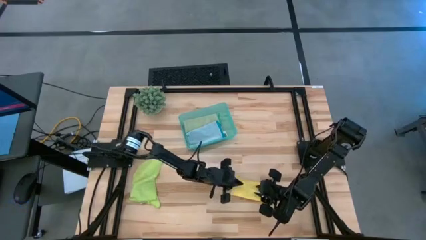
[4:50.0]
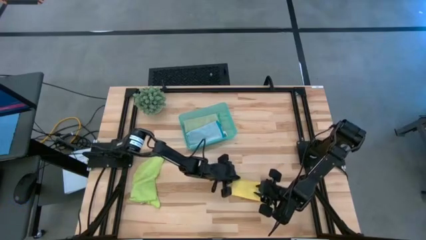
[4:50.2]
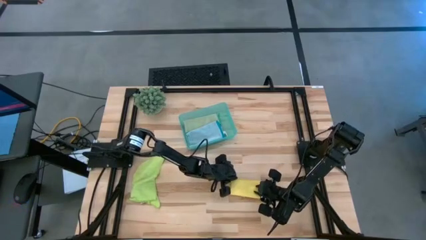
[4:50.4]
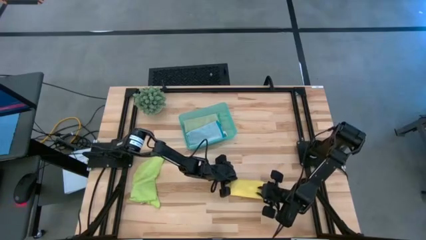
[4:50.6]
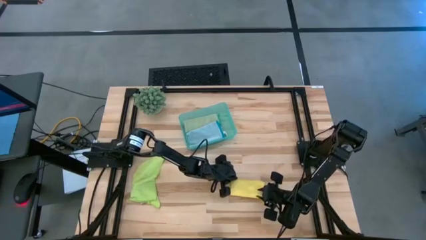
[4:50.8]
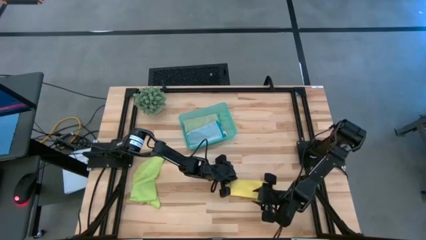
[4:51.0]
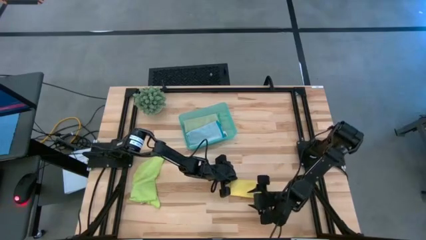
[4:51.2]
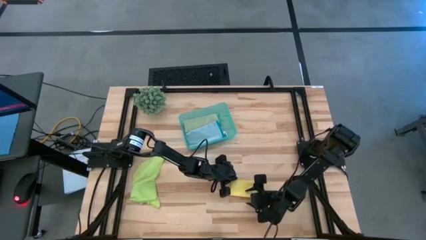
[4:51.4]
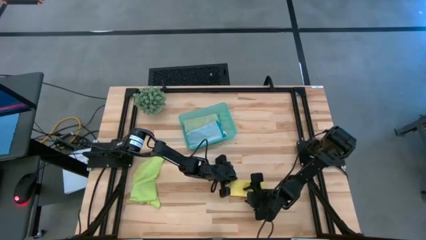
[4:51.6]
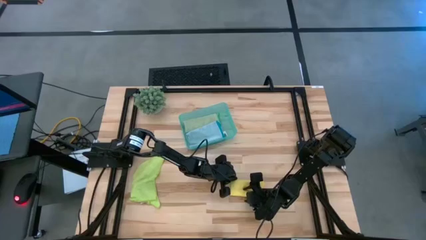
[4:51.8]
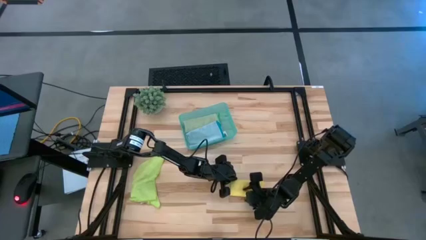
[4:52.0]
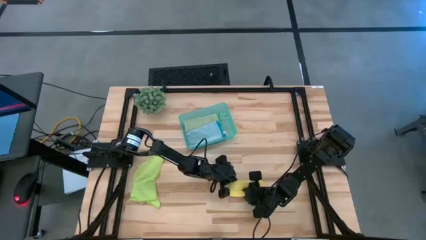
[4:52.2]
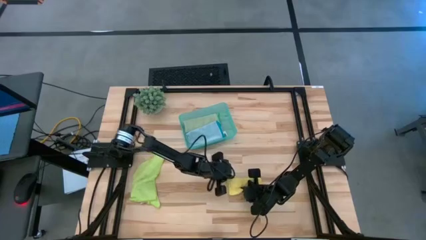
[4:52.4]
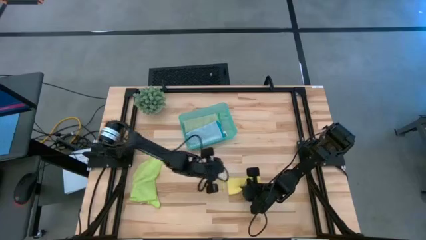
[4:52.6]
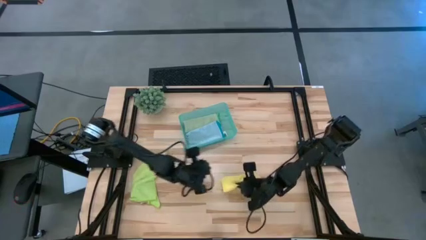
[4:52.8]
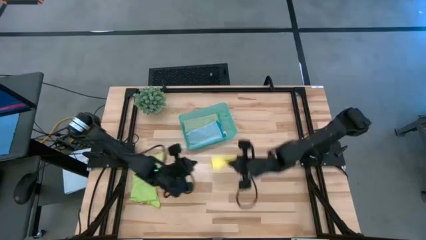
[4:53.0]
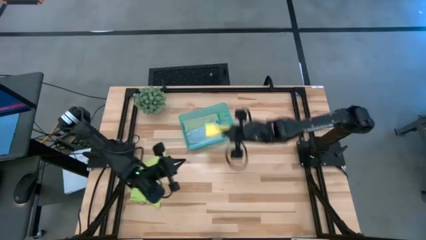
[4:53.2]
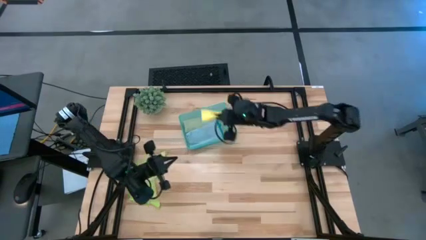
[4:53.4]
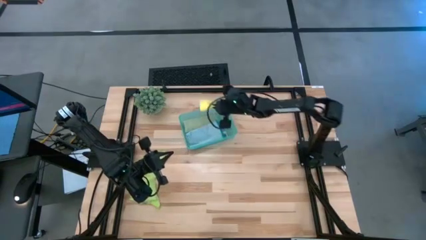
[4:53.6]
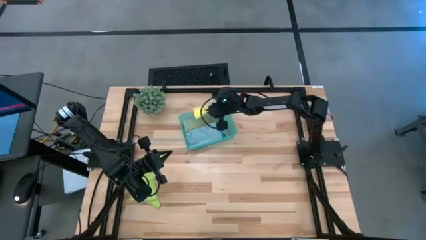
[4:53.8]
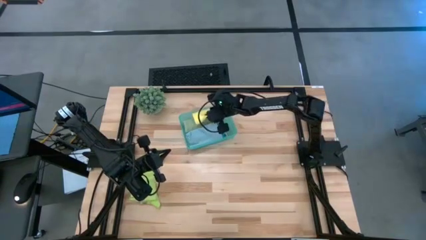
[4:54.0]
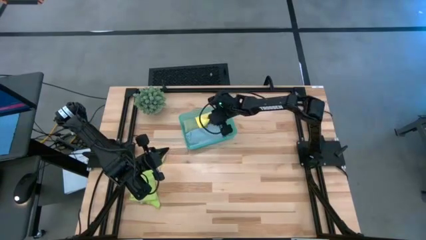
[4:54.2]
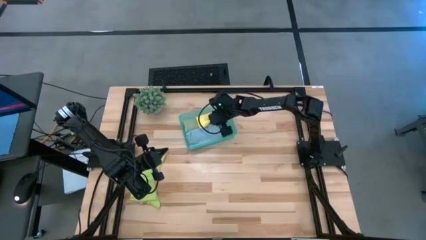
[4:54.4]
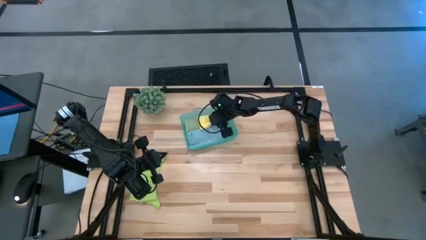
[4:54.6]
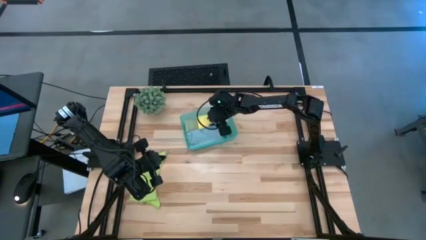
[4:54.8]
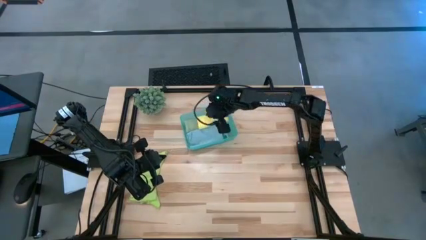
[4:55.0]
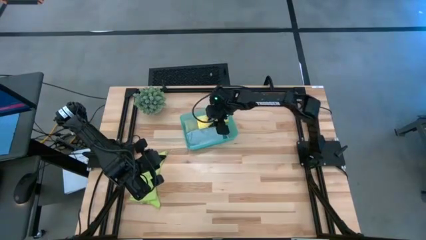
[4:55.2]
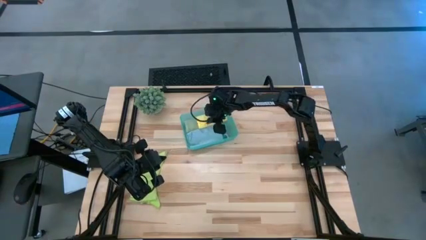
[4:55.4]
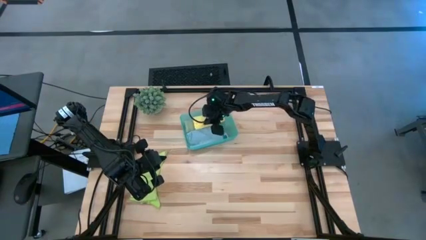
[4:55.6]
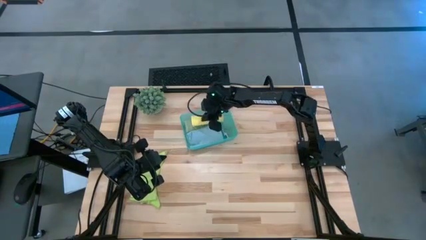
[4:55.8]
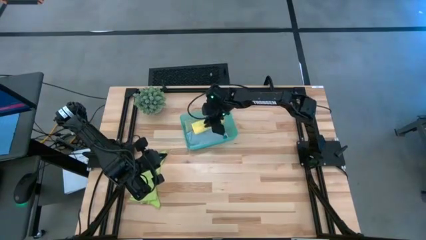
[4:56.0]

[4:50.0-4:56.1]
Task: Fold microfiber towels
Put the yellow towel into the bin

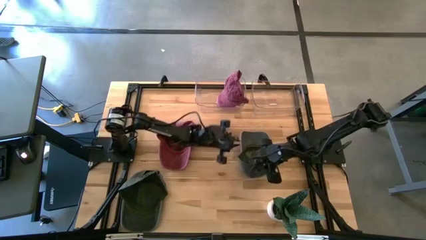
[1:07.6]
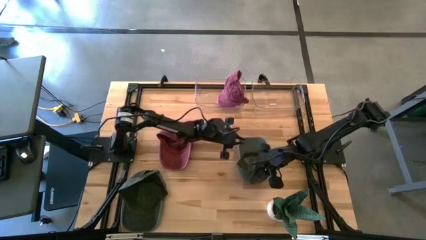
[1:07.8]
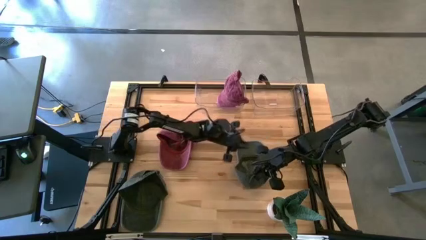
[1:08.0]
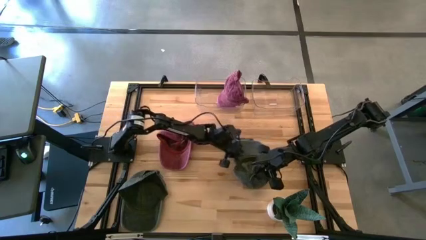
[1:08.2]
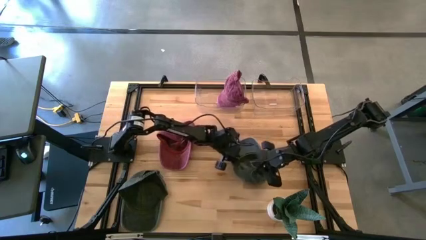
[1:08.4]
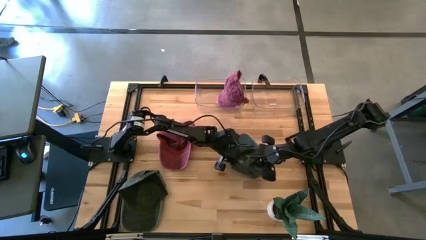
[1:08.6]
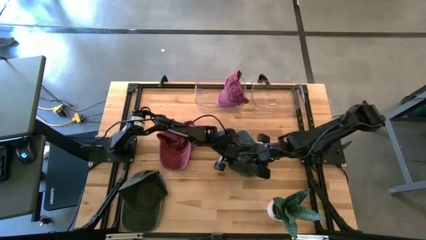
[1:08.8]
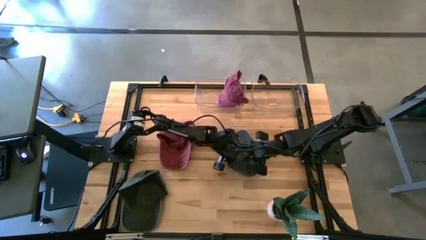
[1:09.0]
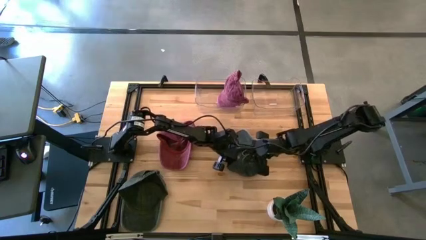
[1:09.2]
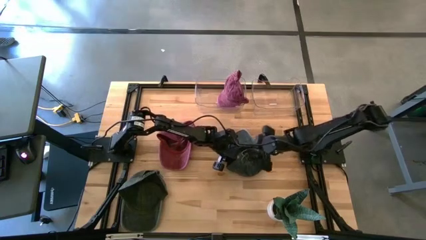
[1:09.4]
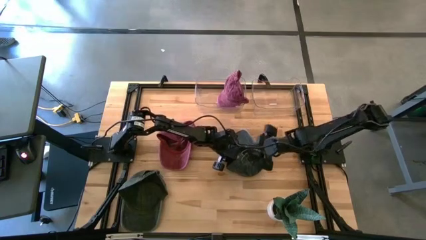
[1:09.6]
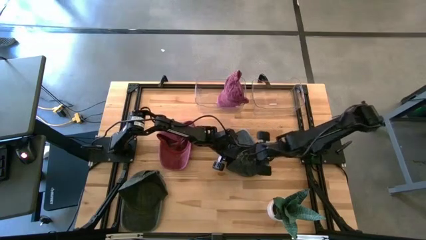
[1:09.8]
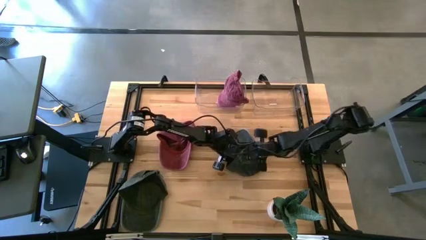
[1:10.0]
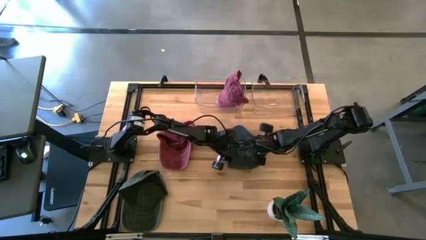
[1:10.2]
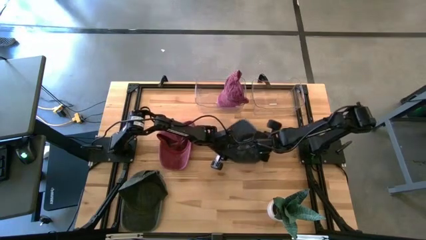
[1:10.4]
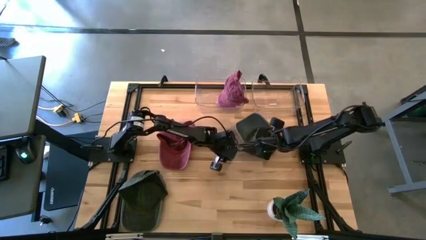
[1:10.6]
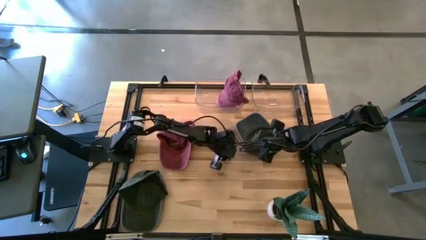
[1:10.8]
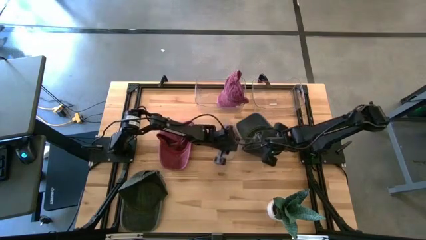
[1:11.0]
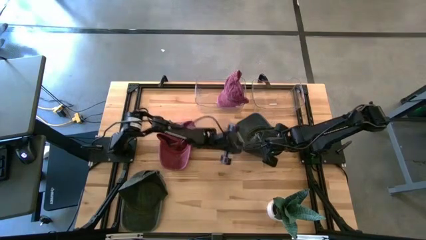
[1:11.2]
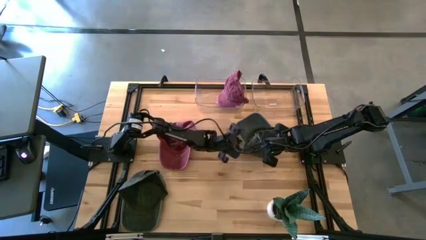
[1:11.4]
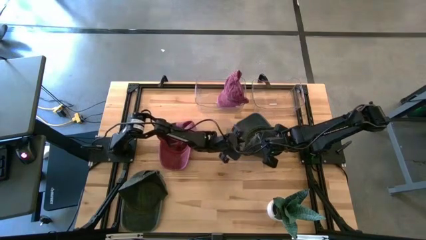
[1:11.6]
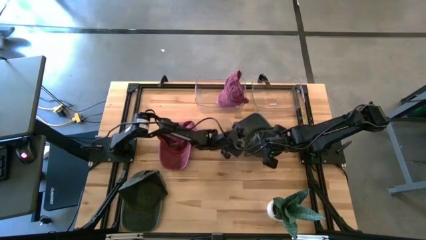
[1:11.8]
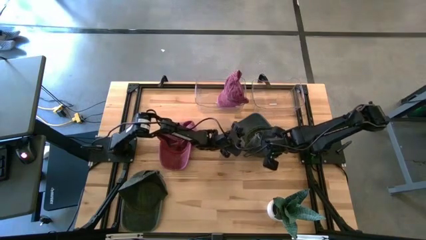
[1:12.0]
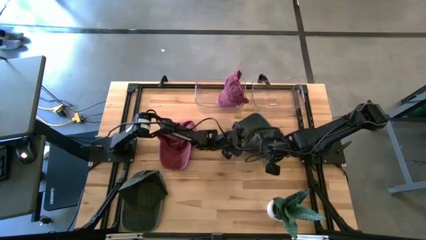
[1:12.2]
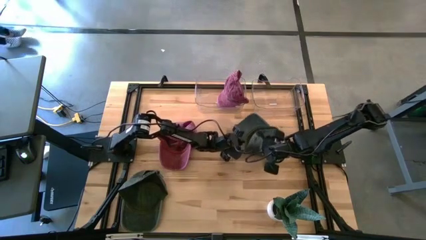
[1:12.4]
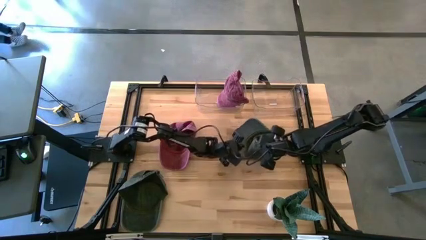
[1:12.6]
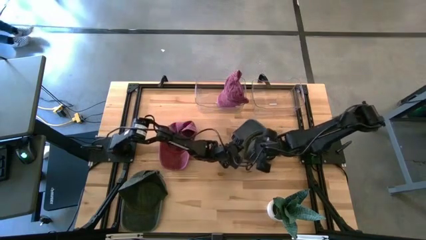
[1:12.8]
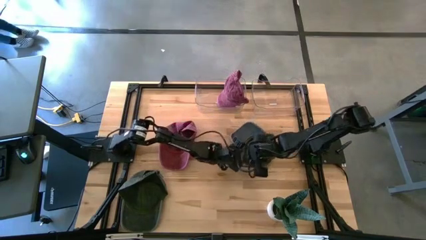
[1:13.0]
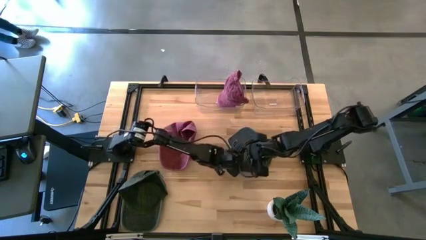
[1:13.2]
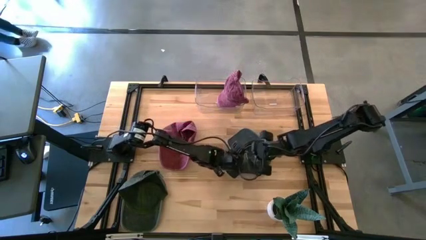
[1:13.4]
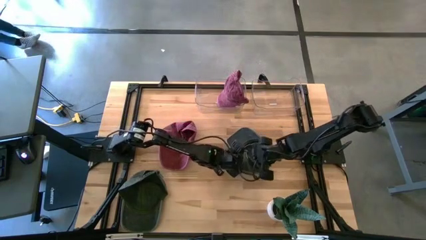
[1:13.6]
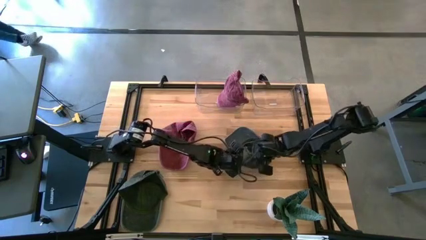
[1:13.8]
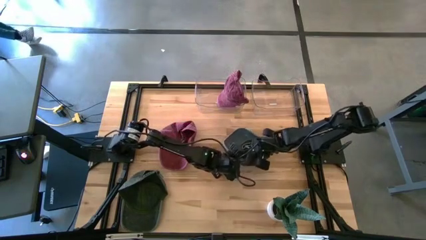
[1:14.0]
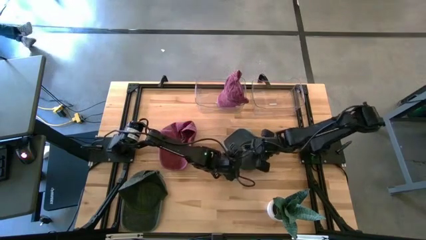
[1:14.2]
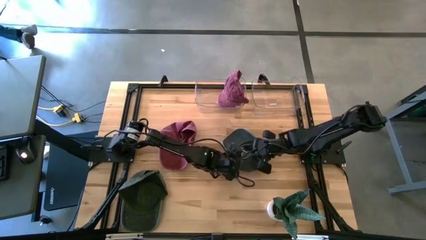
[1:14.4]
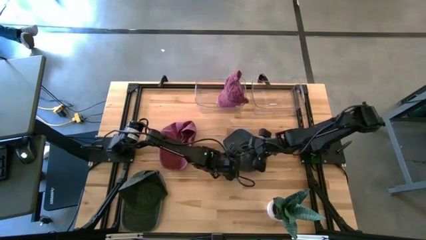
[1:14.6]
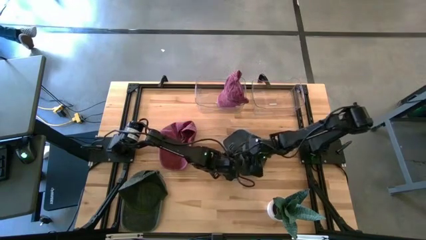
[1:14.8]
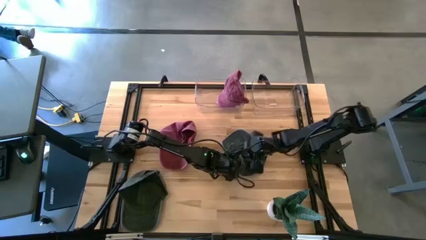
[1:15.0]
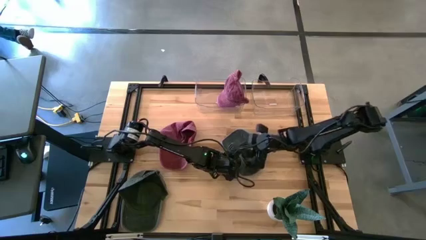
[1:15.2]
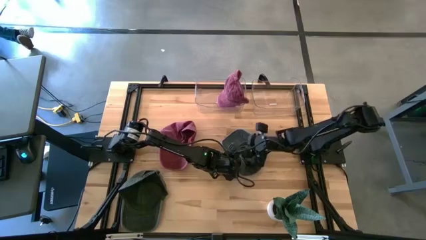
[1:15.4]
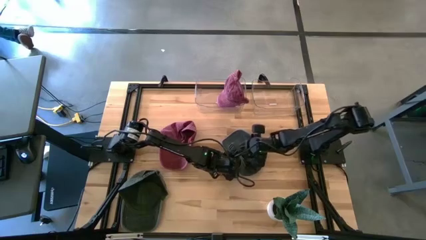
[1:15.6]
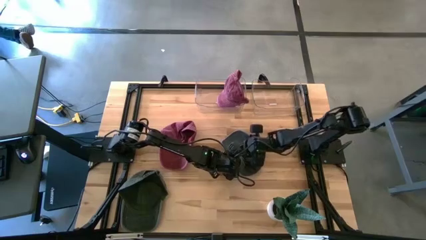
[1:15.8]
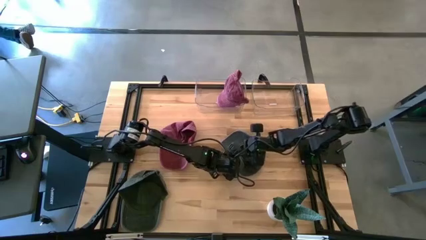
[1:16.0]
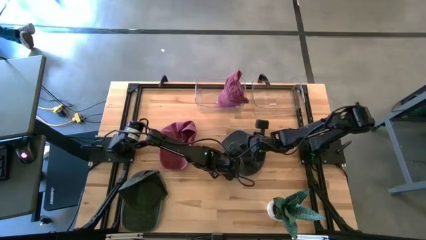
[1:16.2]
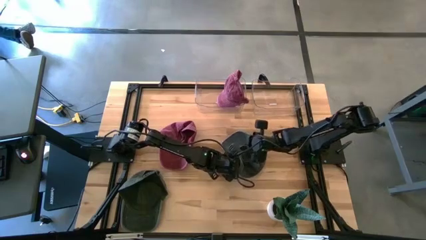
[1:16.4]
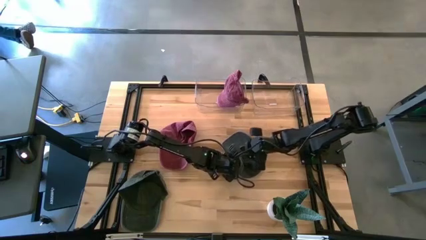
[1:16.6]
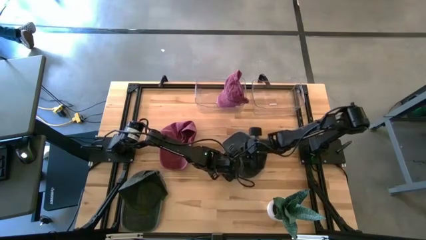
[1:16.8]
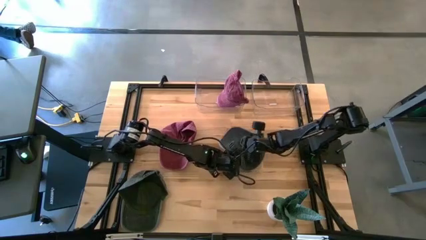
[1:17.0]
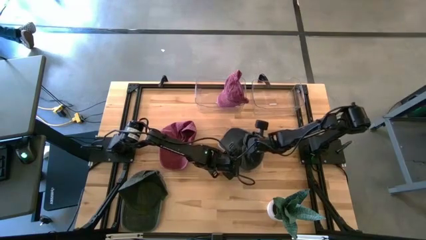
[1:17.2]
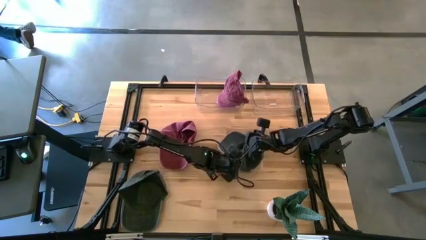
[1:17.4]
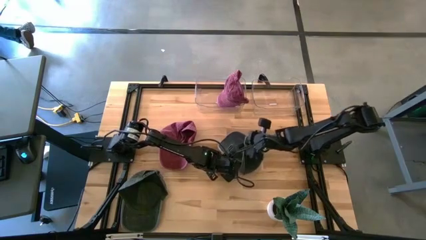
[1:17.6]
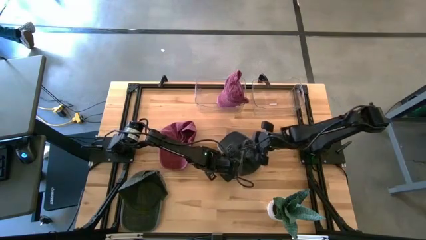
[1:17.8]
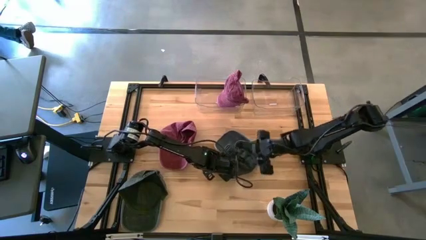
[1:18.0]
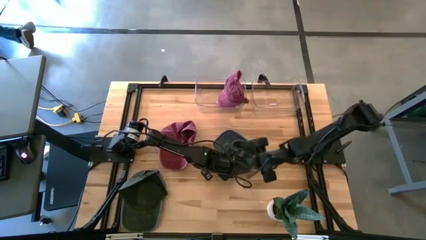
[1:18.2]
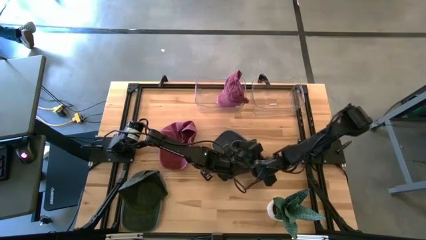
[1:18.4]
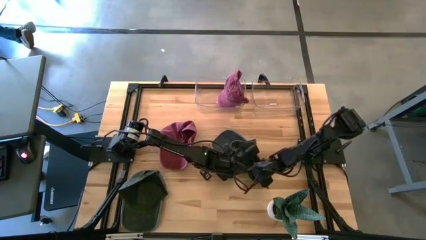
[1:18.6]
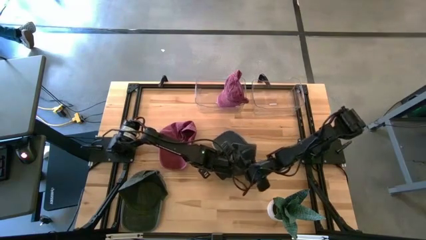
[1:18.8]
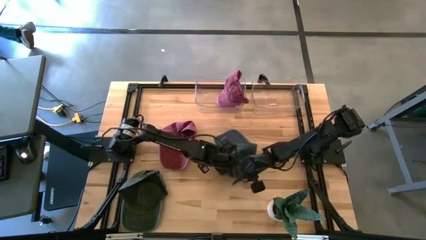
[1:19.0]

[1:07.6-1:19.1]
Task: Pick & Place hat
Put the top black cap into the right transparent bin
